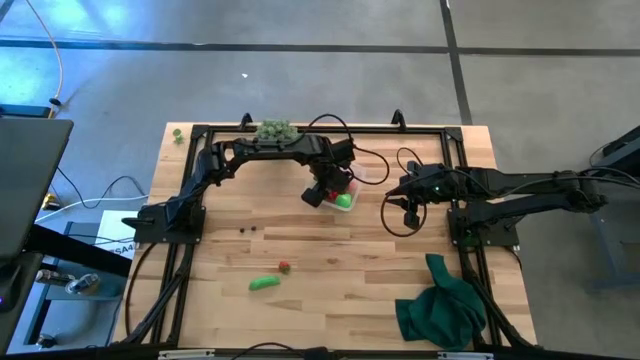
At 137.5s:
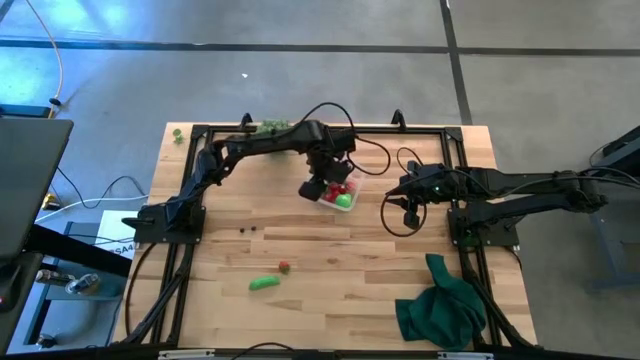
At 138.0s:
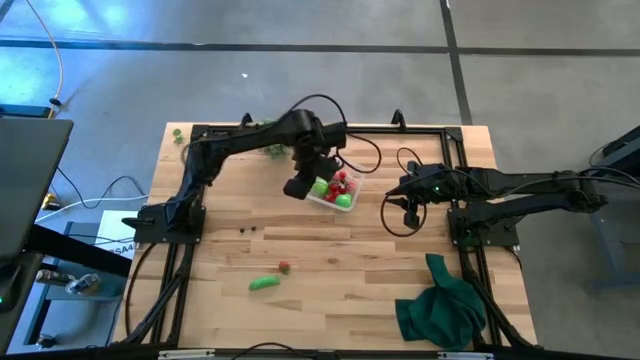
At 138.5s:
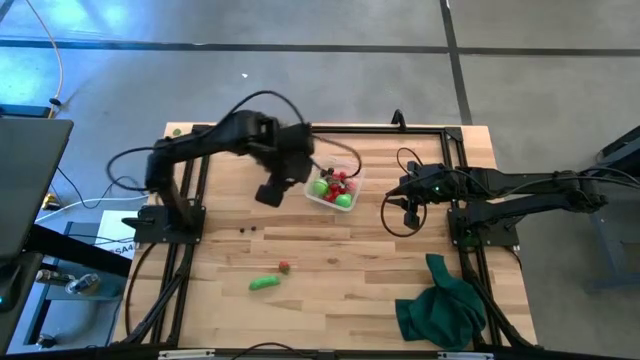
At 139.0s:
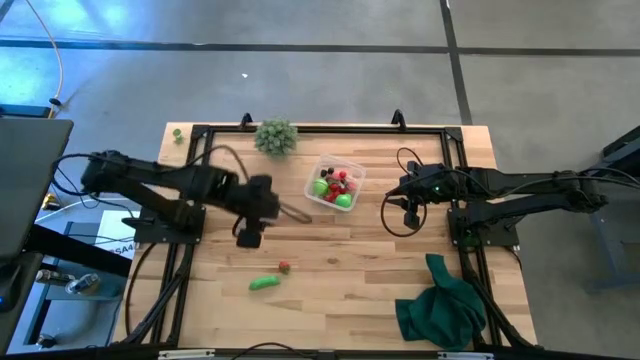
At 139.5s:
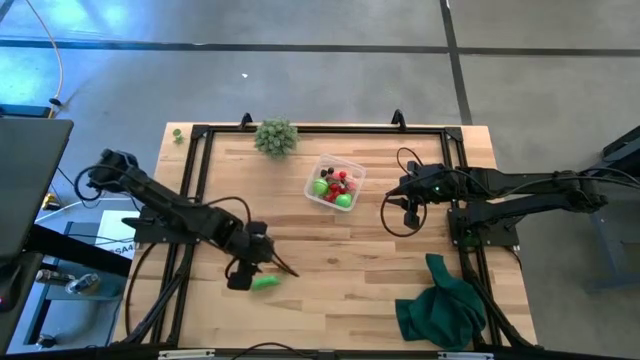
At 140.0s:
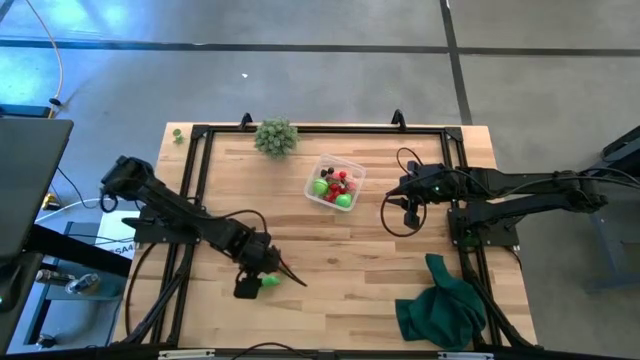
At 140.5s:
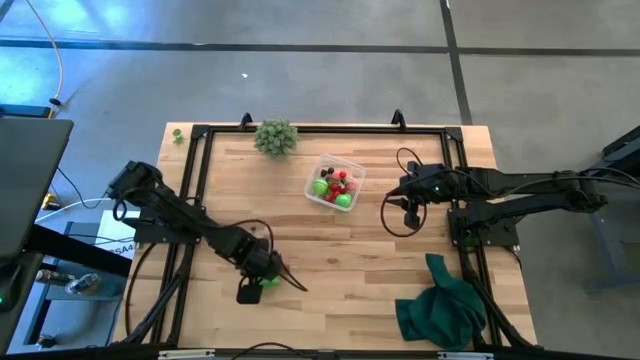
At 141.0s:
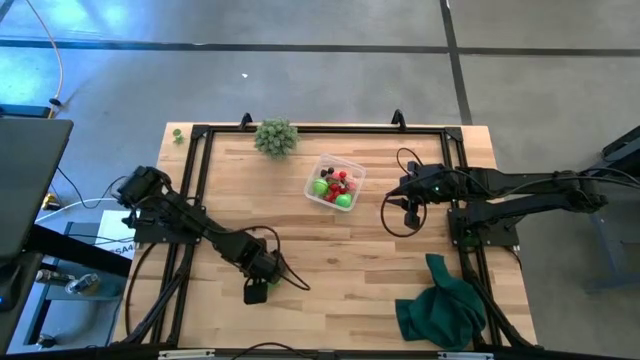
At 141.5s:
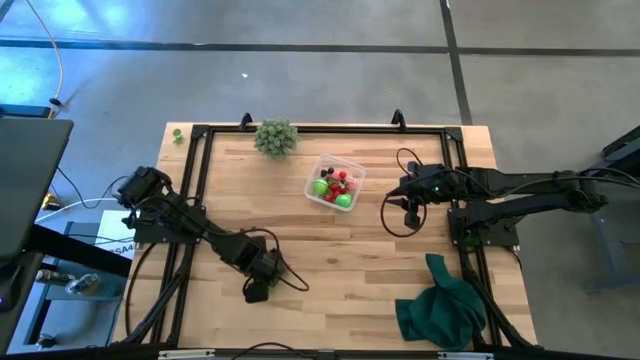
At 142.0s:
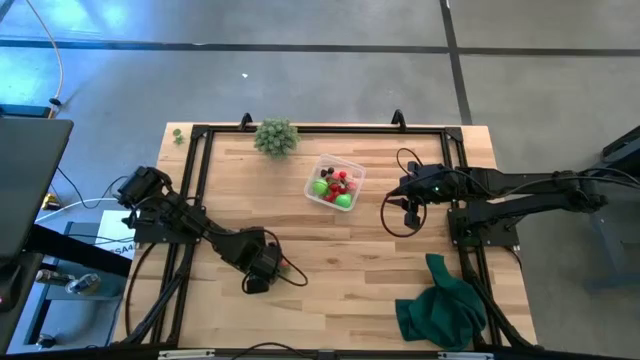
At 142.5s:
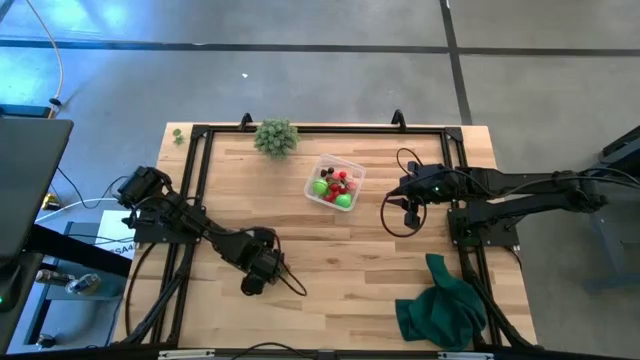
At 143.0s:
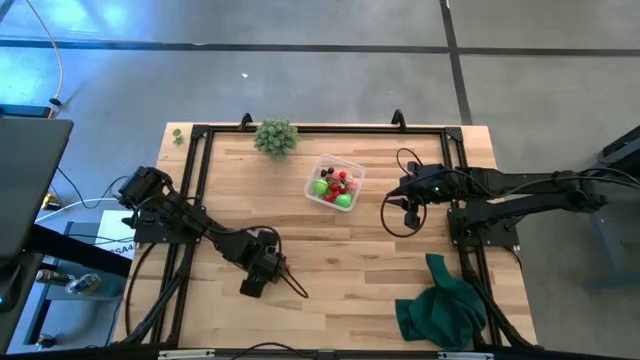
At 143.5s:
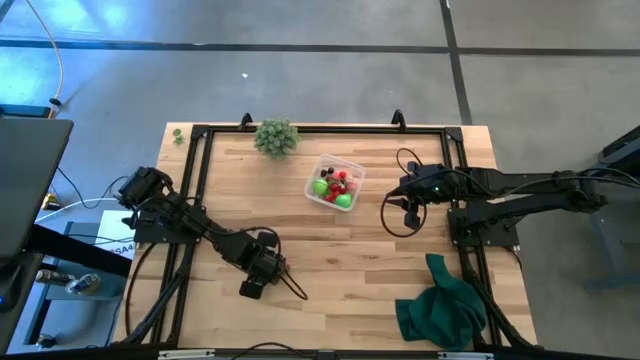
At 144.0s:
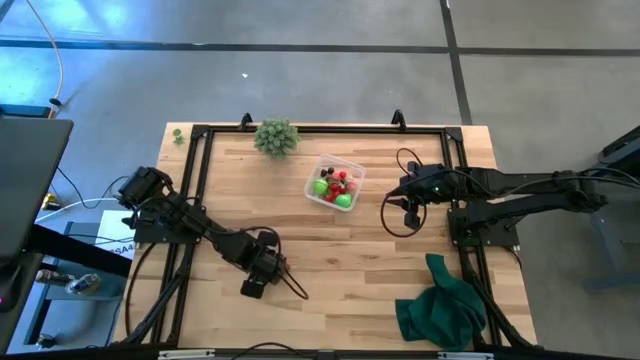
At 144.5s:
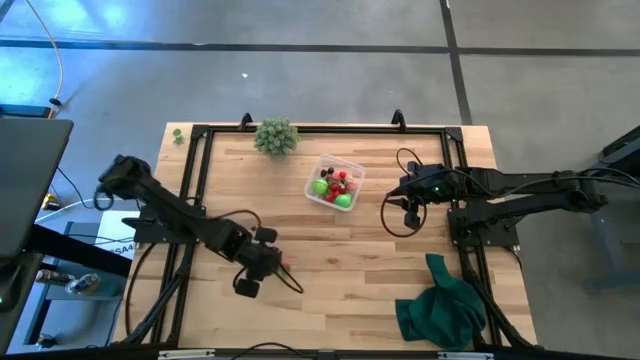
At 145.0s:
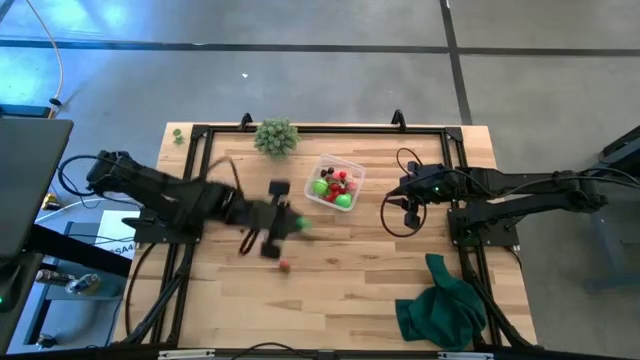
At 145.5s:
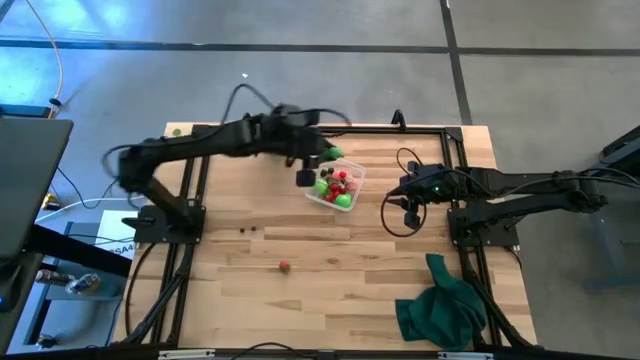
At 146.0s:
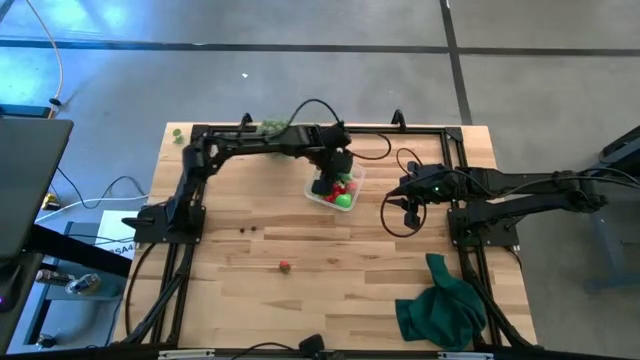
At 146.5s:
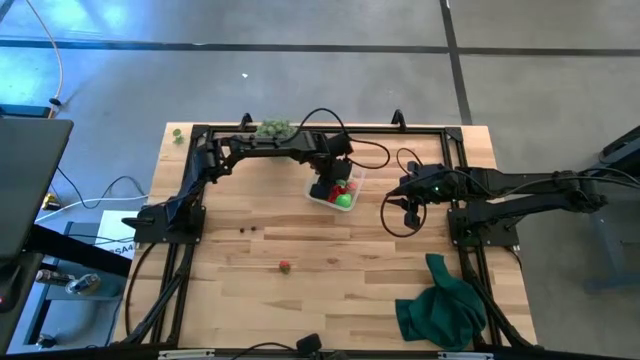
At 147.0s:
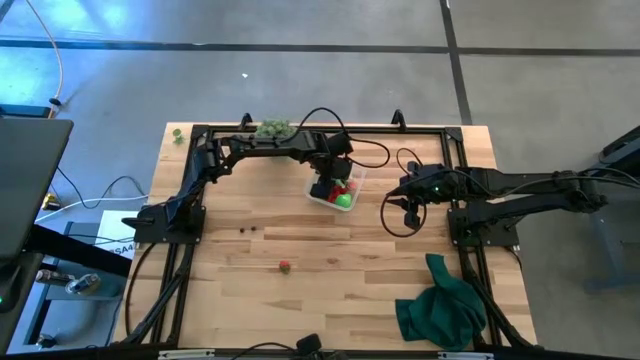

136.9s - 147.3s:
Task: Pick and placing Produce into tupperware
Put the pea into the transparent container

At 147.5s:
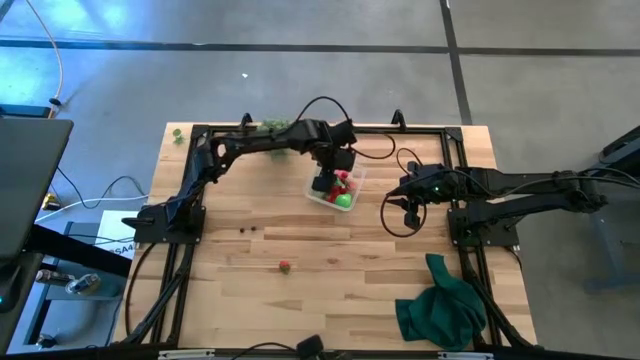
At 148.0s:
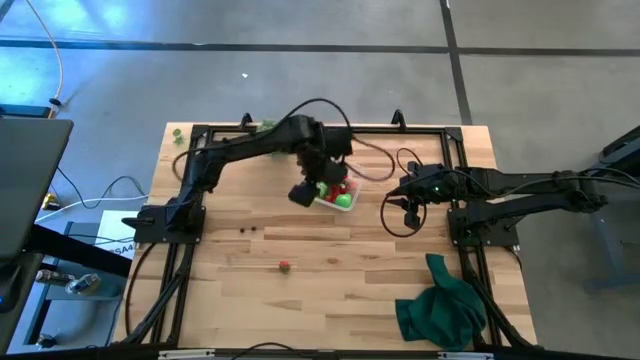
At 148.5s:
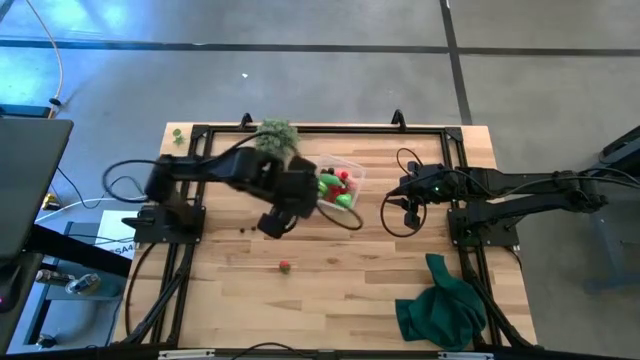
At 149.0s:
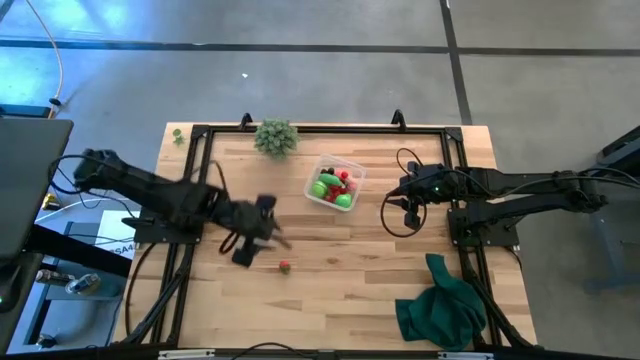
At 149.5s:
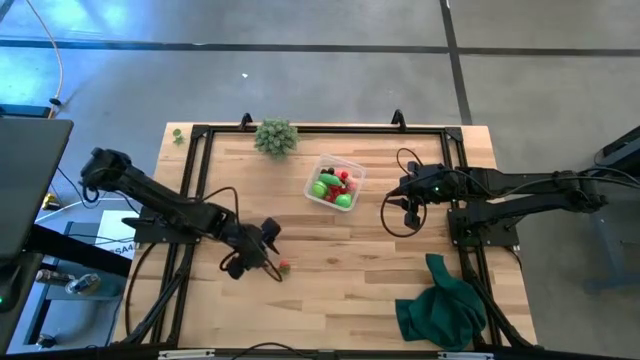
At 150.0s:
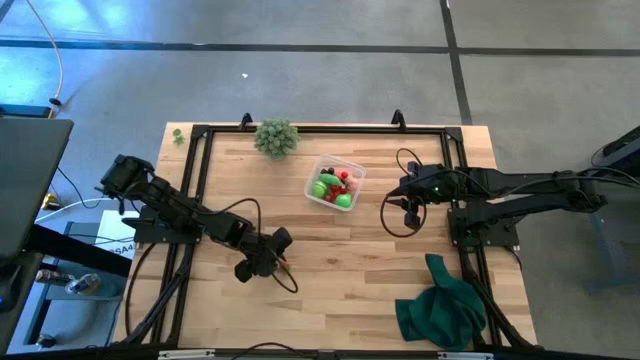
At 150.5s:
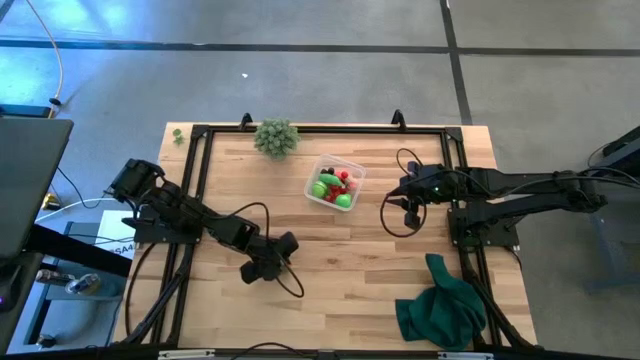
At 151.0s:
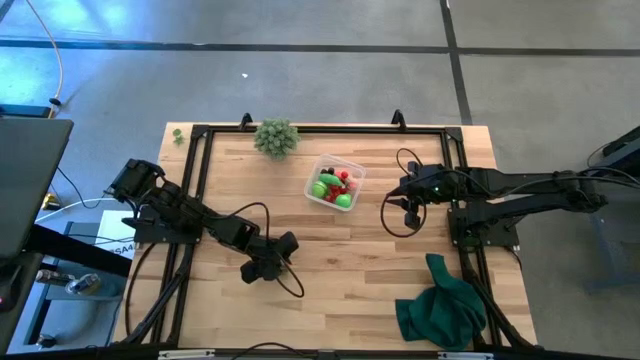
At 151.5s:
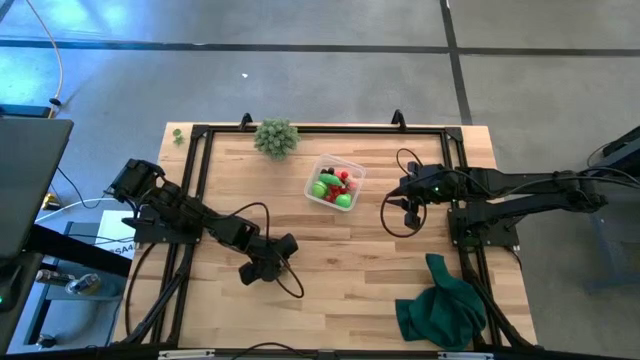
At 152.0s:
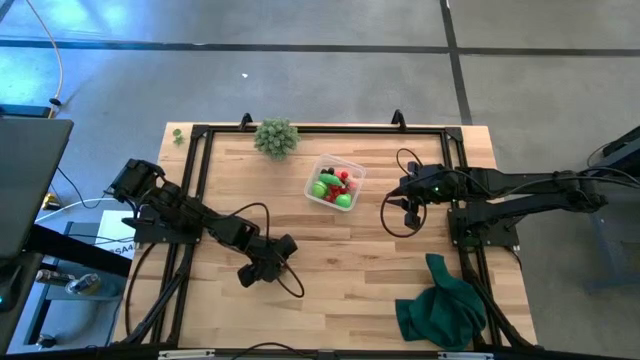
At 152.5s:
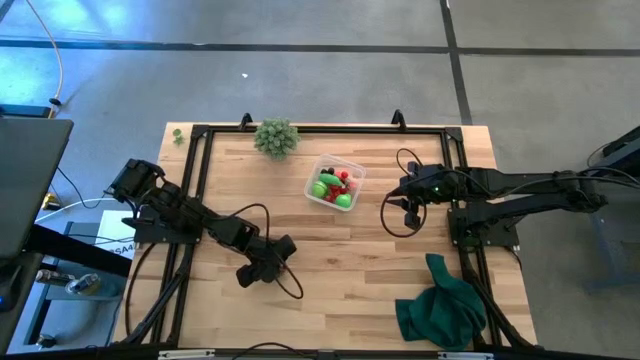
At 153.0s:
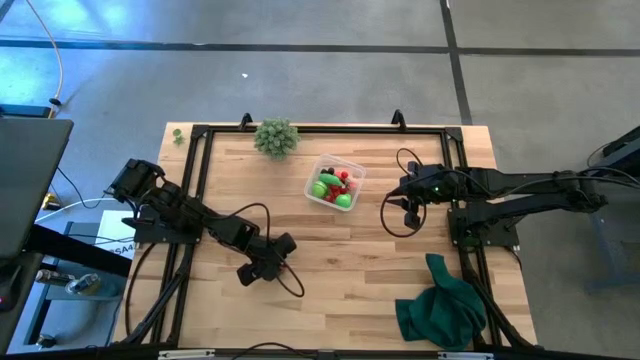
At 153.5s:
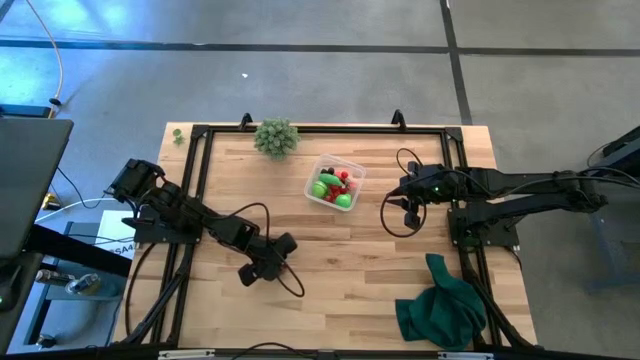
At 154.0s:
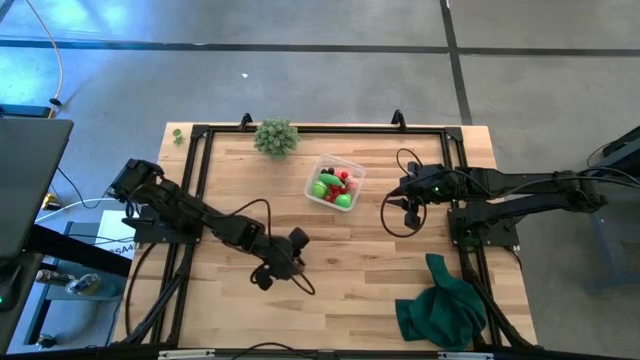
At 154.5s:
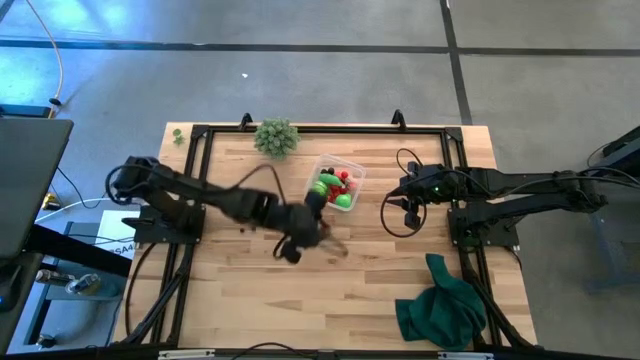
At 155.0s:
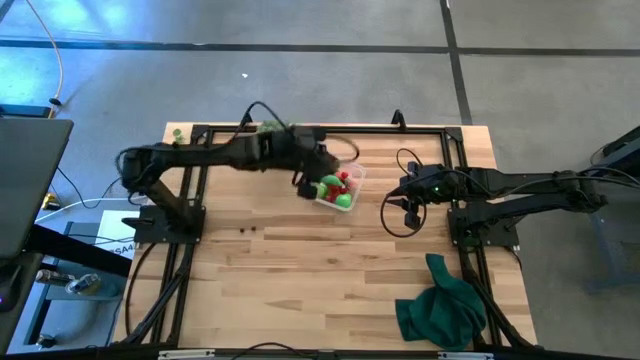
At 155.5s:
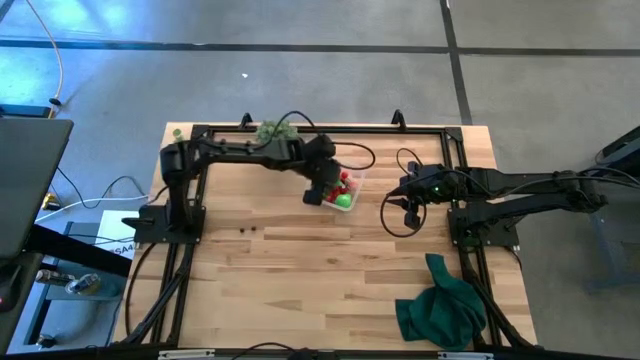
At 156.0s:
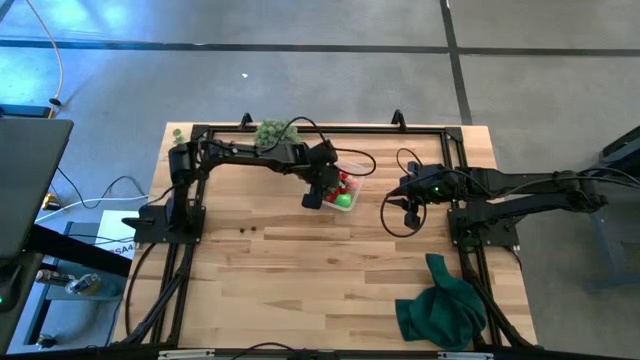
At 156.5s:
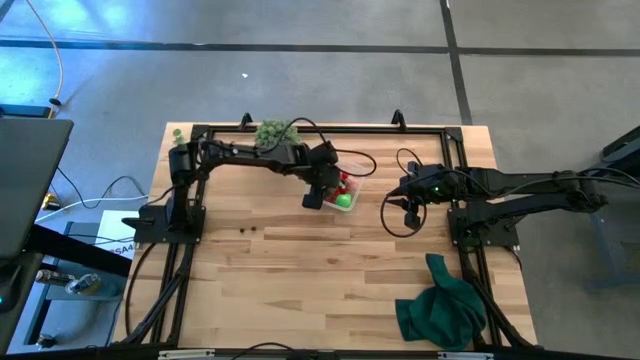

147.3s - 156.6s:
Put the strawberry into the transparent container

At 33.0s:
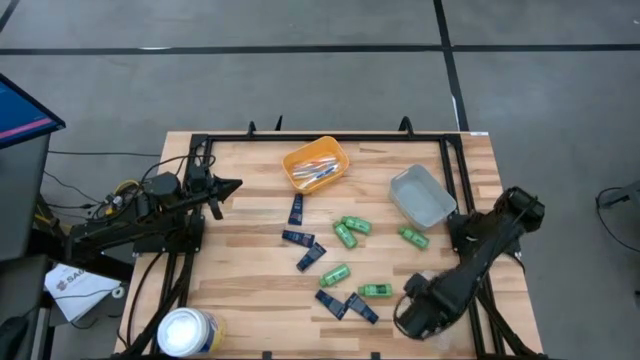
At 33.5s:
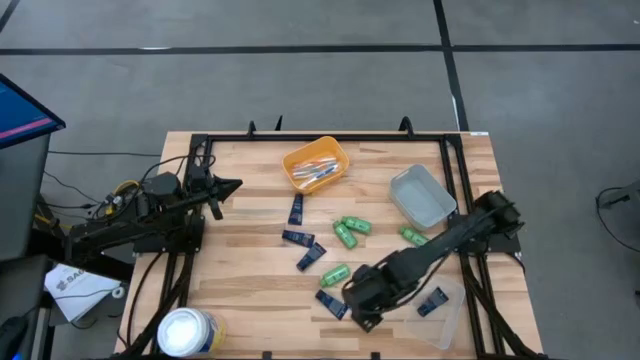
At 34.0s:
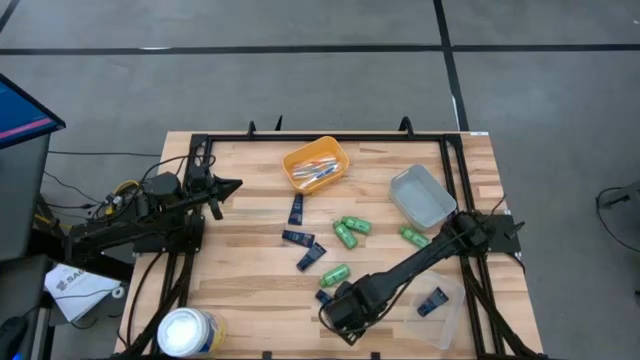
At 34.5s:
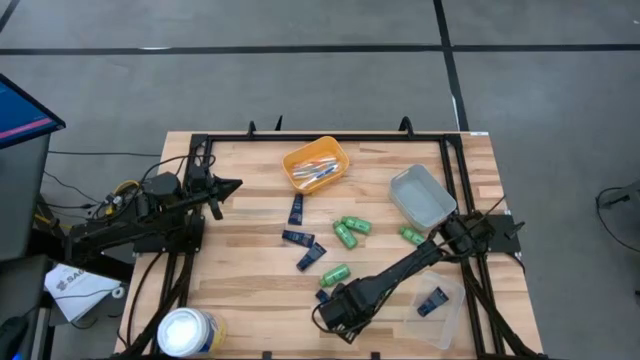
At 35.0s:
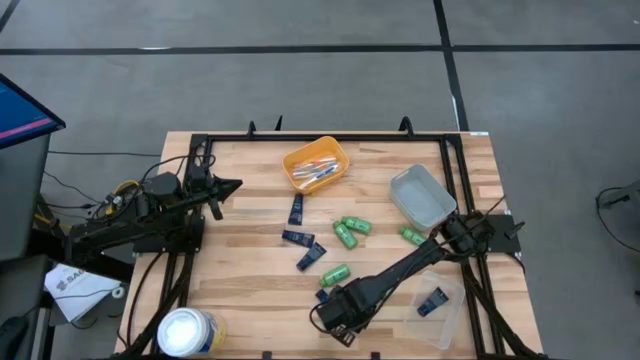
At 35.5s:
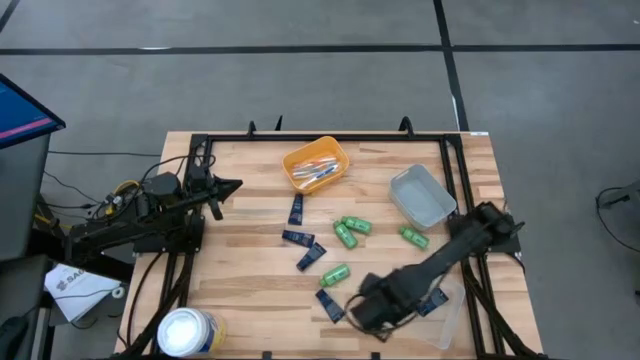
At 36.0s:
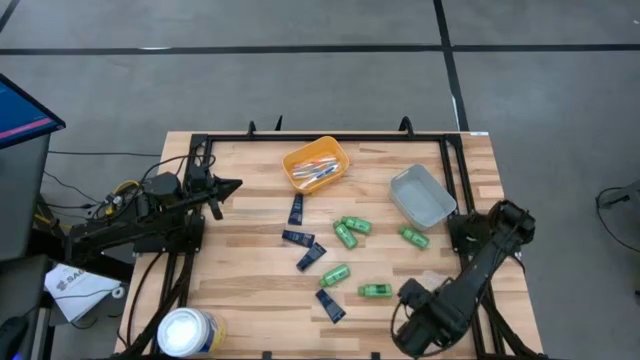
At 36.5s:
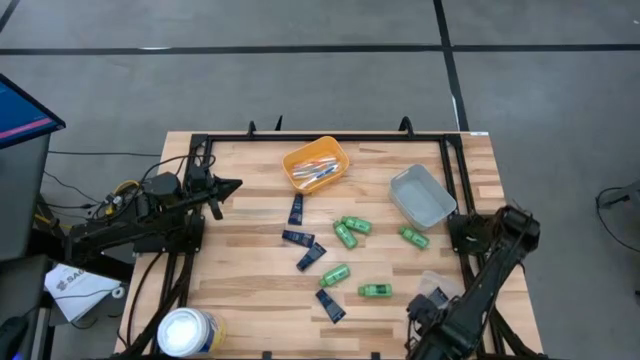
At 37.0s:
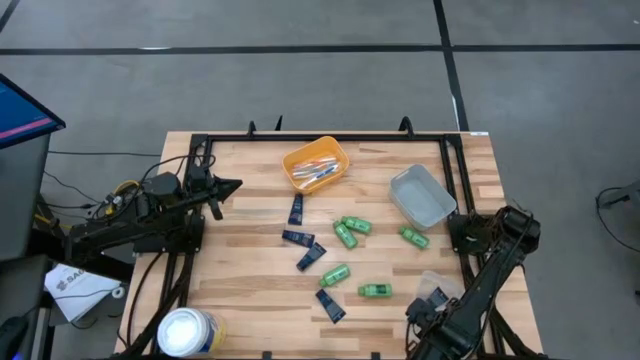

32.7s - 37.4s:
Task: Pick & Place Travel size toiletries
Put the dark blue shave cream into the transparent bin
